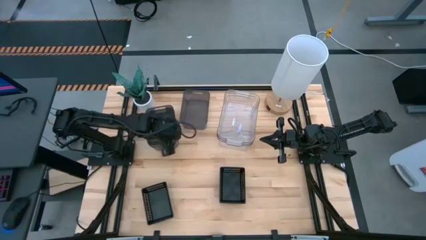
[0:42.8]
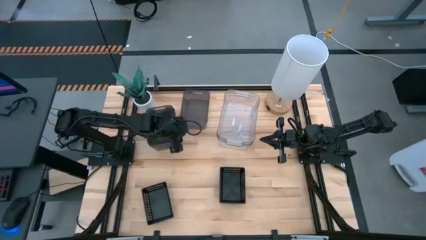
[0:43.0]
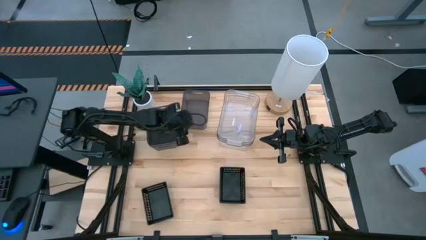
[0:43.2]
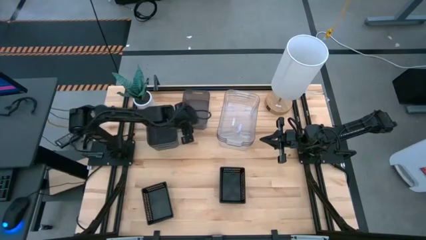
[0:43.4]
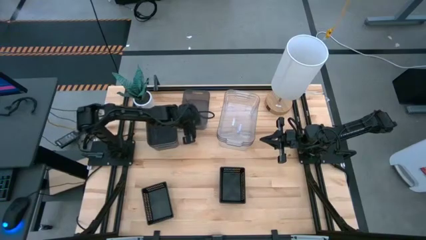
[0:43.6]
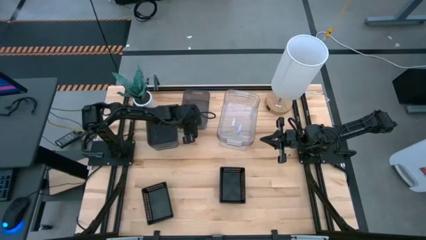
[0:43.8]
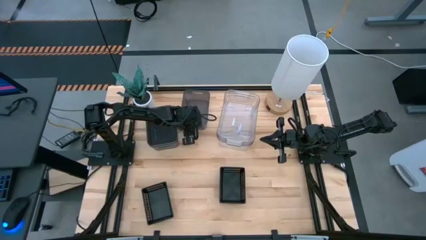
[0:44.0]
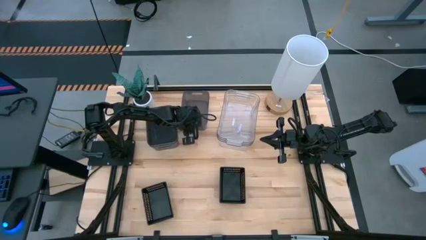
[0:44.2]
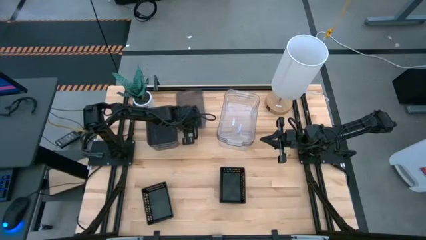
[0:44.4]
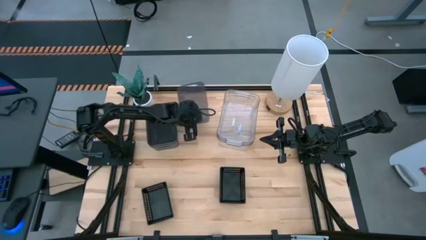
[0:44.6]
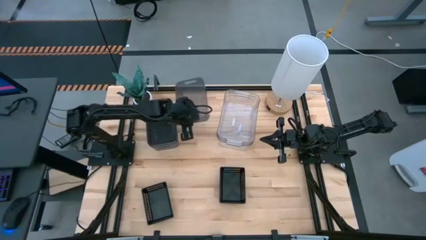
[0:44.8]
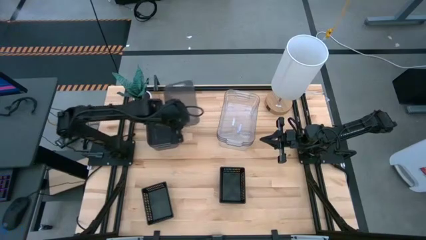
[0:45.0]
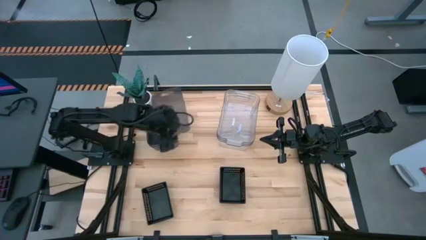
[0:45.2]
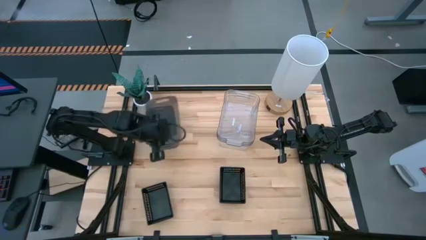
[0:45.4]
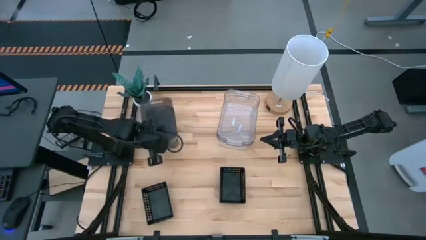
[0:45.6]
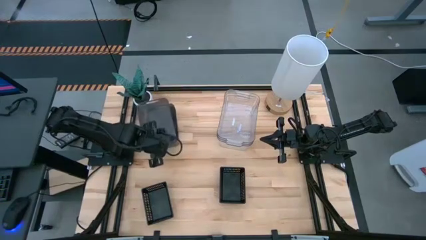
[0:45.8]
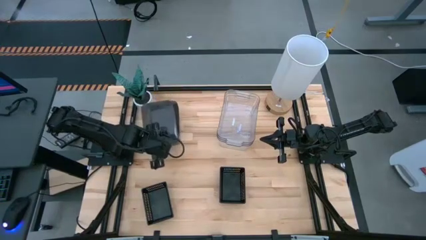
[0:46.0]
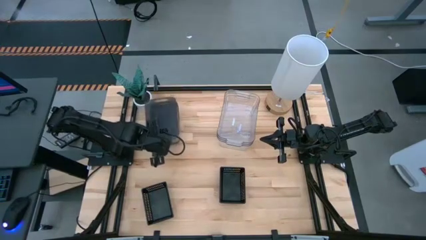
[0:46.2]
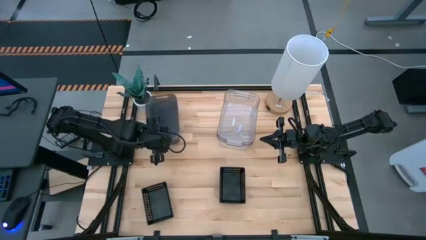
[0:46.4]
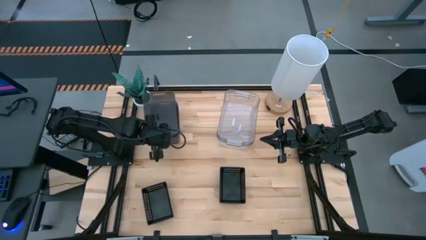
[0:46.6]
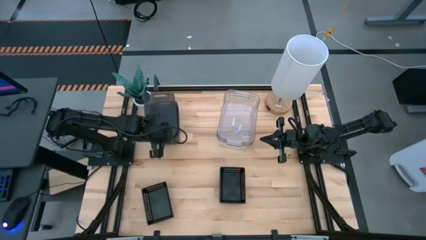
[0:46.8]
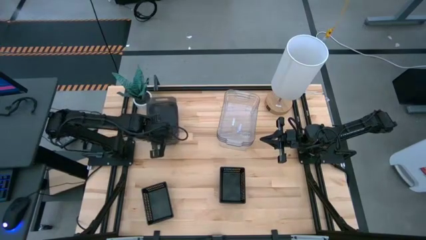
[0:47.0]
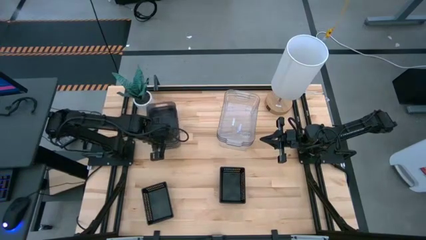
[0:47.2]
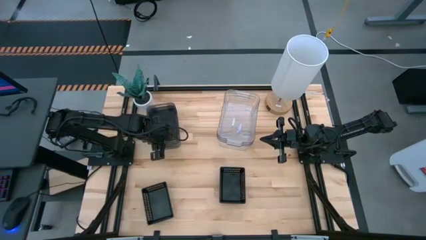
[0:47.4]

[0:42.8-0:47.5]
Stack the right black bin on the left black bin

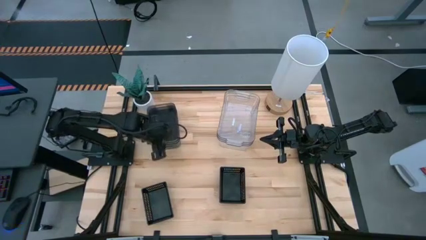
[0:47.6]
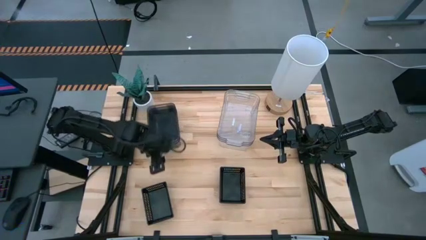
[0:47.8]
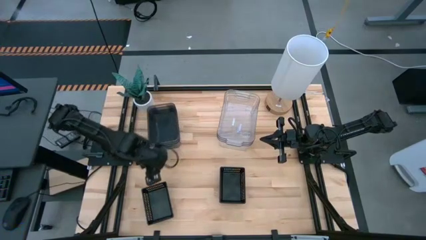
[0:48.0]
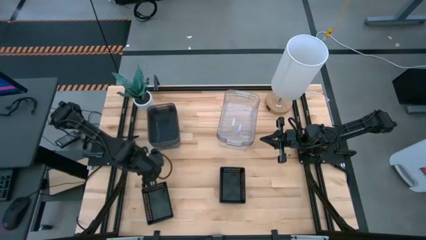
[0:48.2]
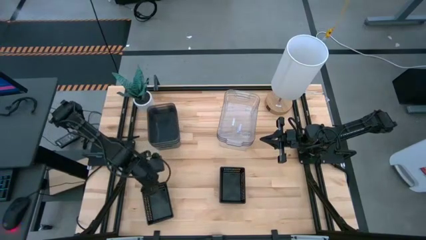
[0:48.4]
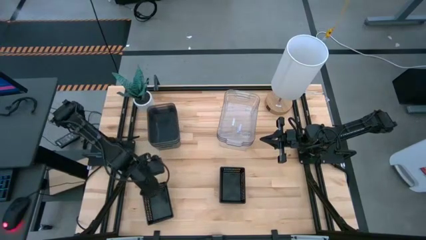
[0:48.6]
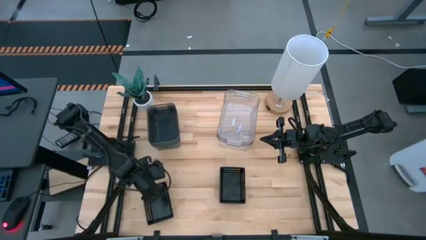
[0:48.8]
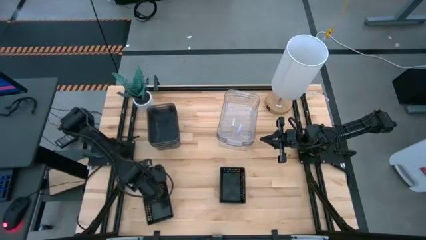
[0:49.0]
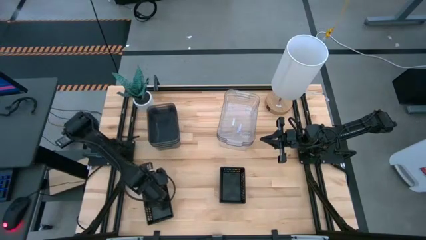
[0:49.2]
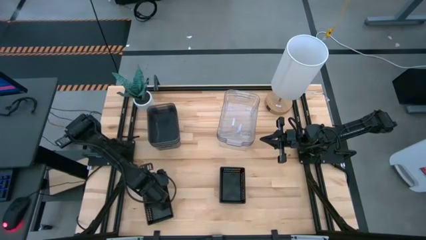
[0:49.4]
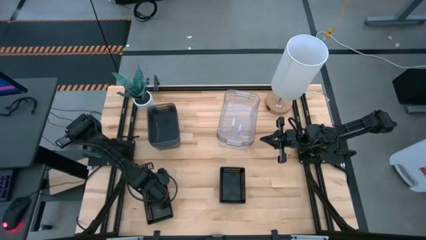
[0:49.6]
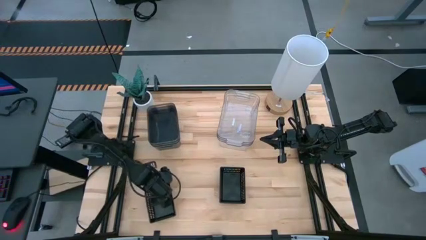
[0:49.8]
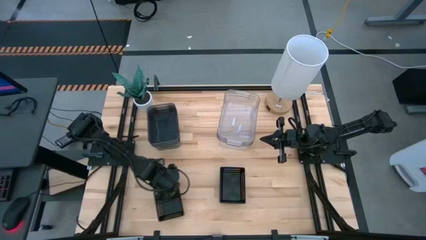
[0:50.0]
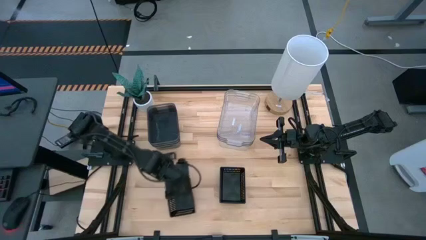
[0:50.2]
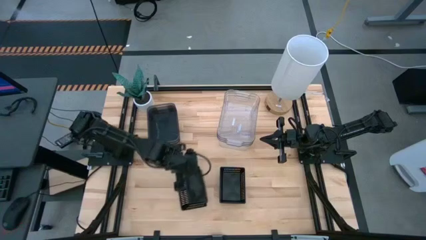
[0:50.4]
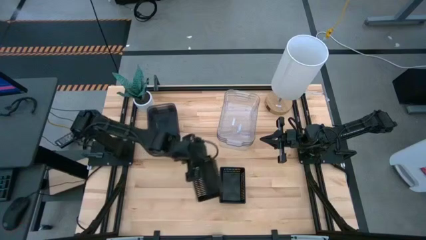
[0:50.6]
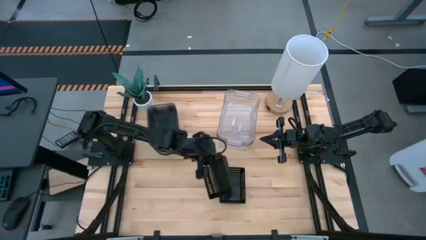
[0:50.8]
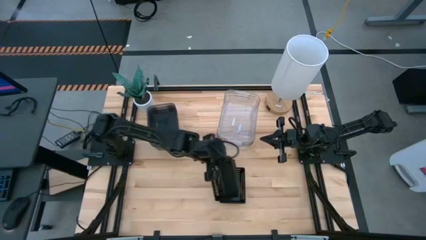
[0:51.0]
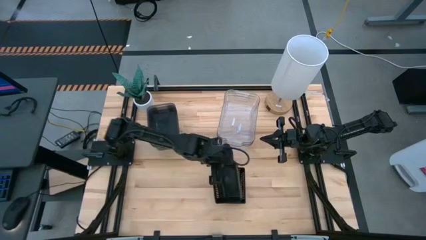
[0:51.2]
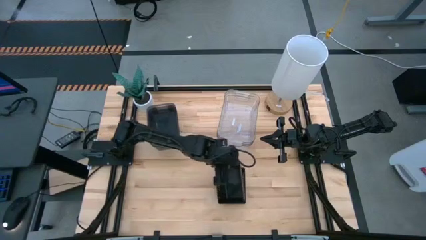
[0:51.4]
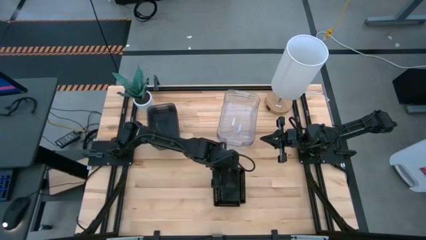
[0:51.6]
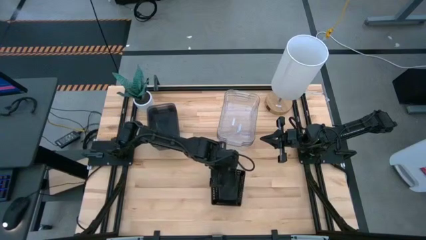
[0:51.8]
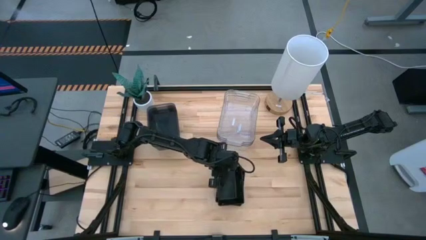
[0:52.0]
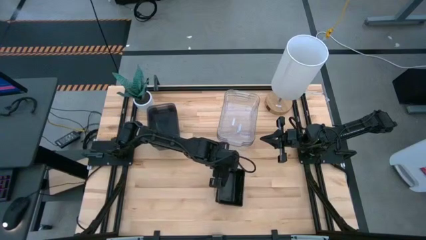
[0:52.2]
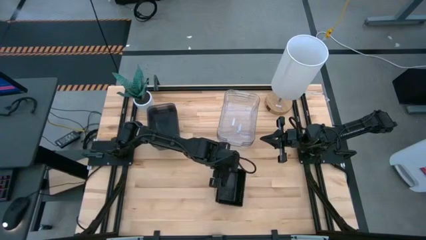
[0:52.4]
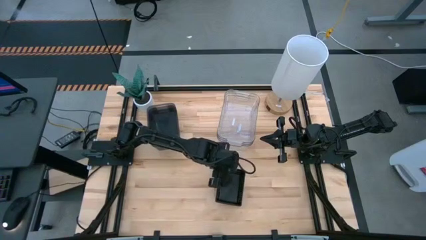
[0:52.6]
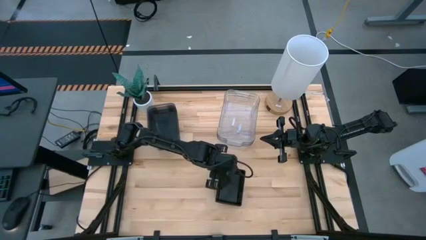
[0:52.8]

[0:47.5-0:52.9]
Stack the left black bin on the right black bin

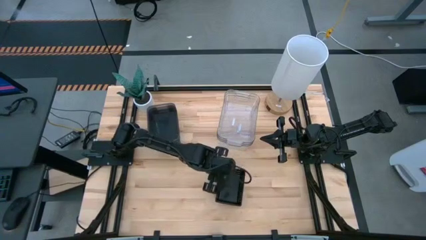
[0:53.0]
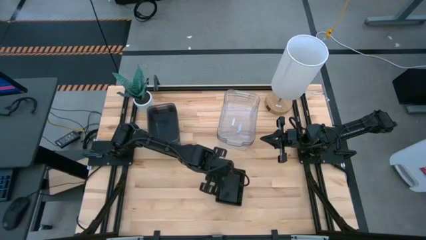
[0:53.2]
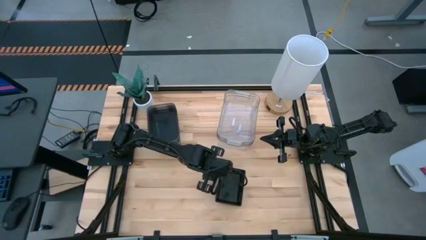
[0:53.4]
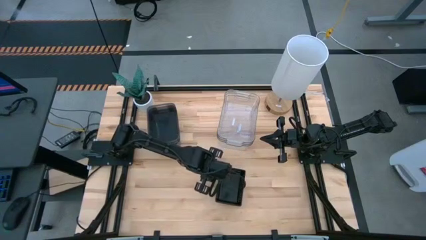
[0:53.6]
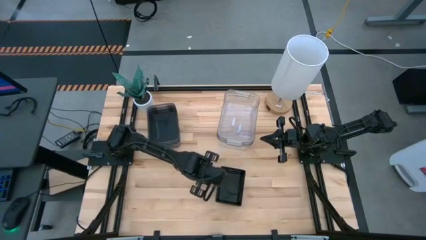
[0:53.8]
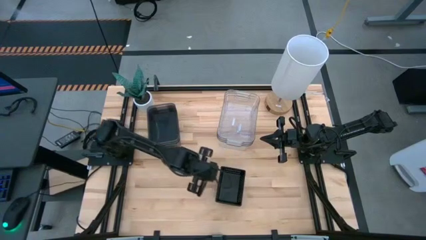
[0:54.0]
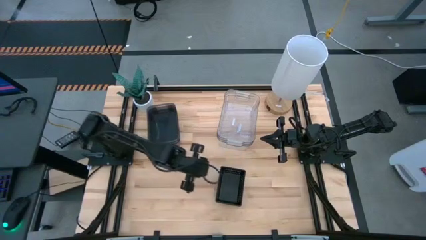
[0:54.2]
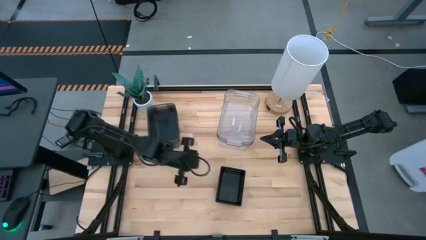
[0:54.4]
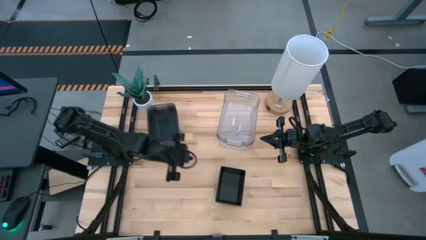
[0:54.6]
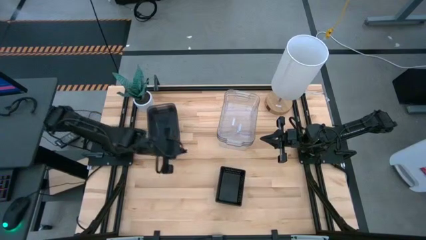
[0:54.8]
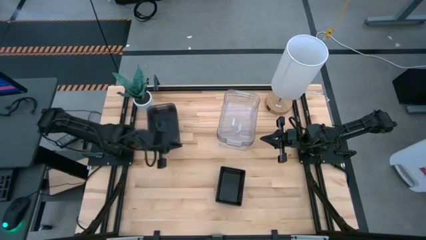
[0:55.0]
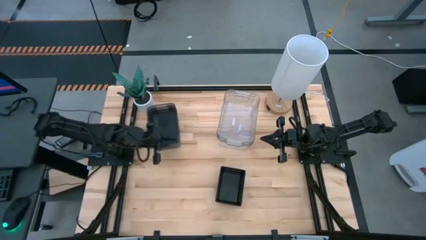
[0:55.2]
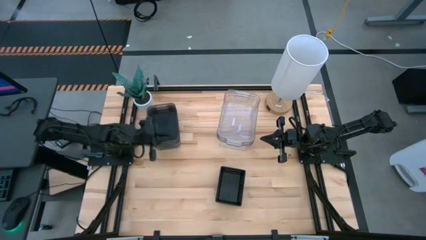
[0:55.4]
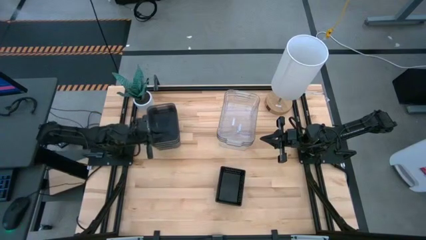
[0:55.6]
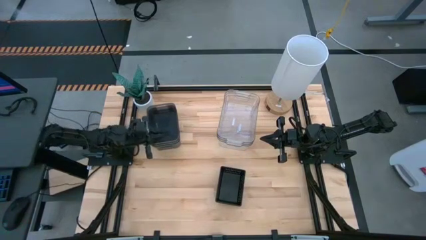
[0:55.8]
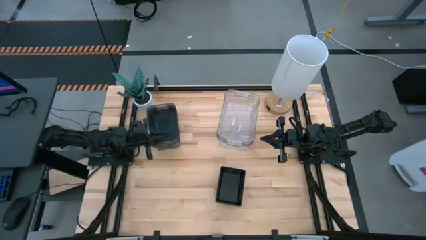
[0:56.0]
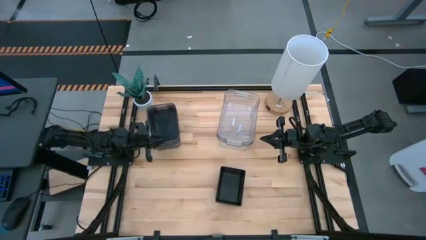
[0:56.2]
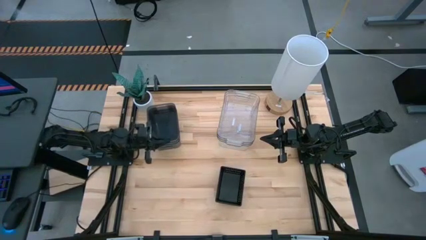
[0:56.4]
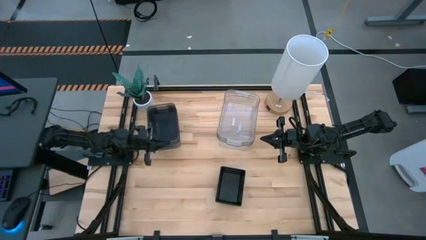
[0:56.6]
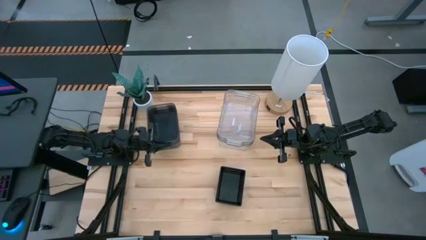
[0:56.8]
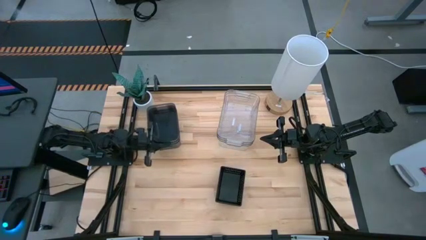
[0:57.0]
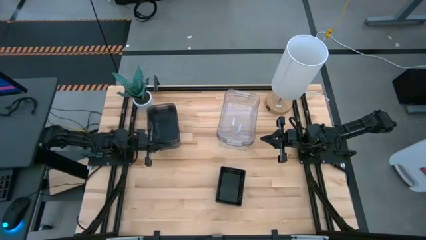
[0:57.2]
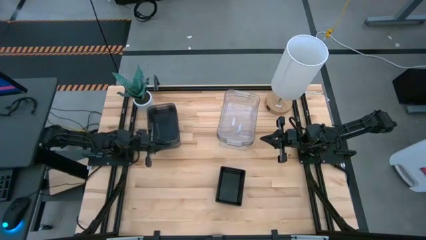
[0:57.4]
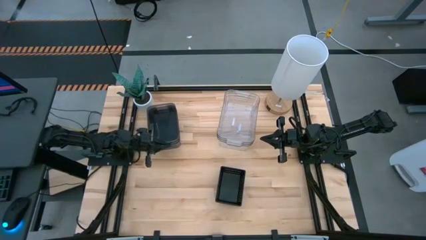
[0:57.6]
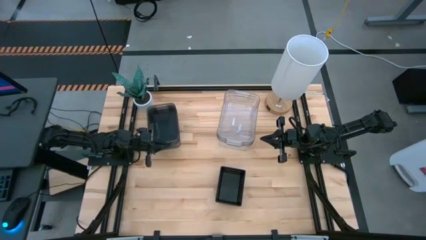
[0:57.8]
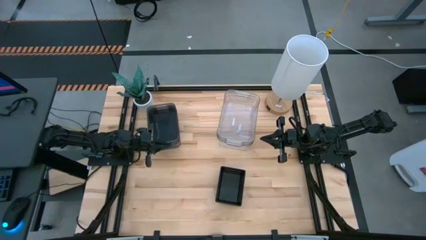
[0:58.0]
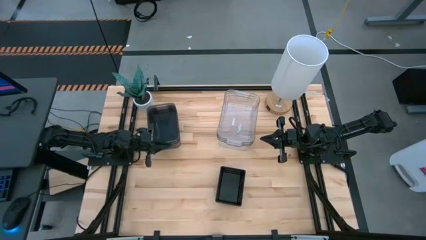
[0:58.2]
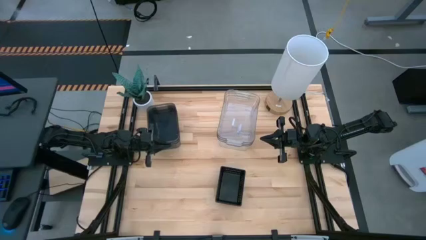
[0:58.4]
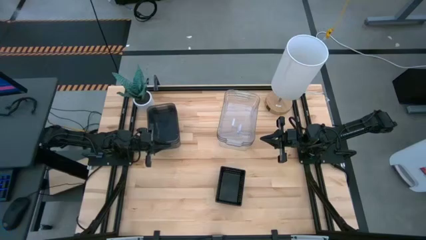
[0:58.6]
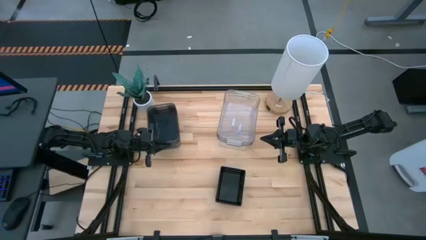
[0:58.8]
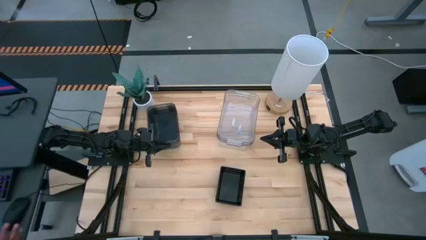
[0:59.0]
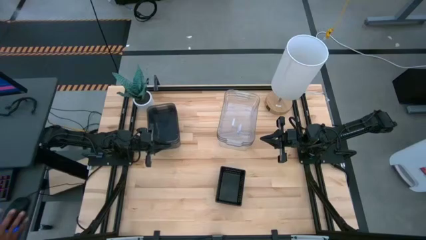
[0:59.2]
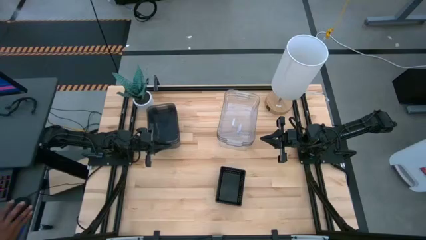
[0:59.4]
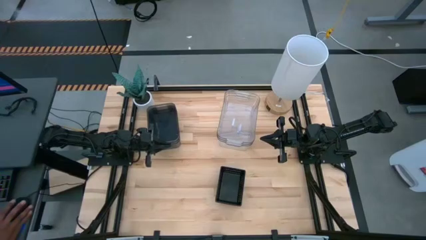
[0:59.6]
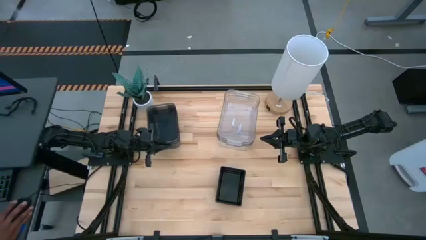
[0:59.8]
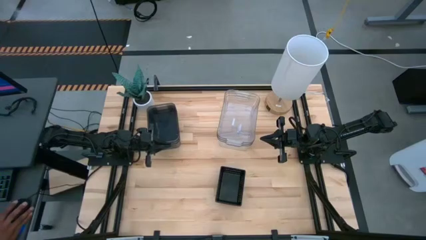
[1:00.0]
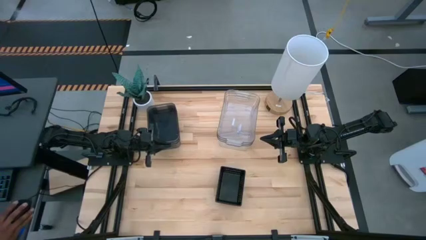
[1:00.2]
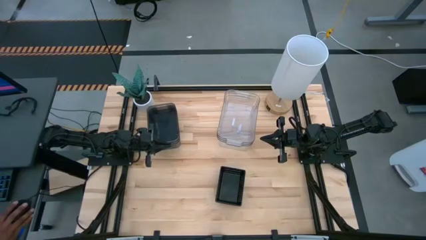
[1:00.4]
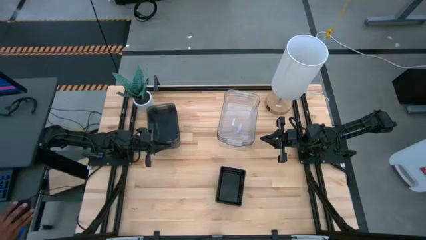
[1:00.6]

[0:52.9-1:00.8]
Return to Home Position
